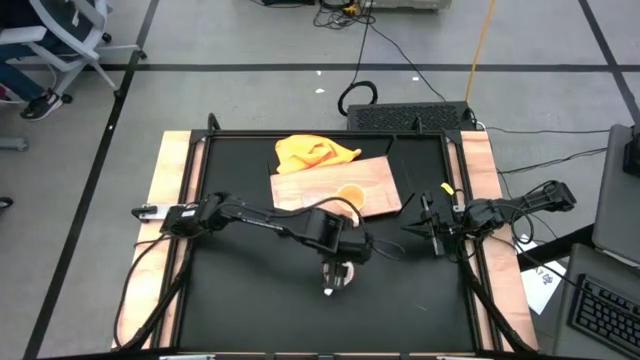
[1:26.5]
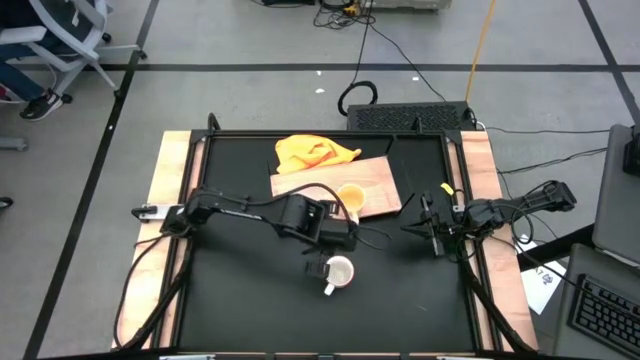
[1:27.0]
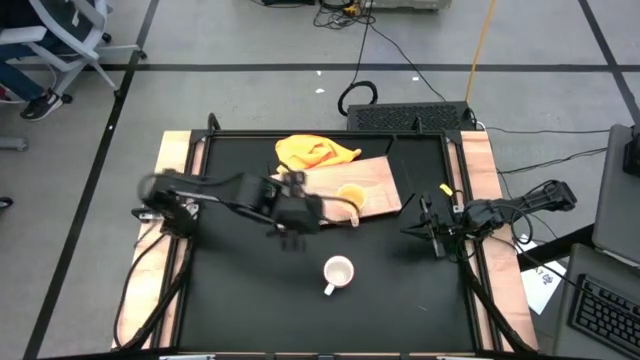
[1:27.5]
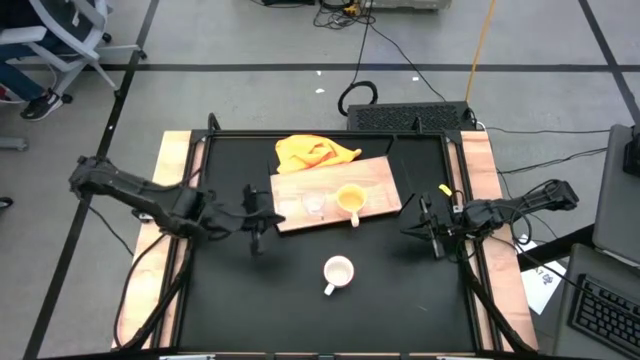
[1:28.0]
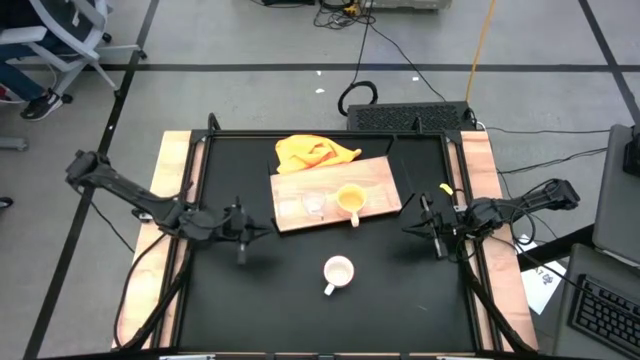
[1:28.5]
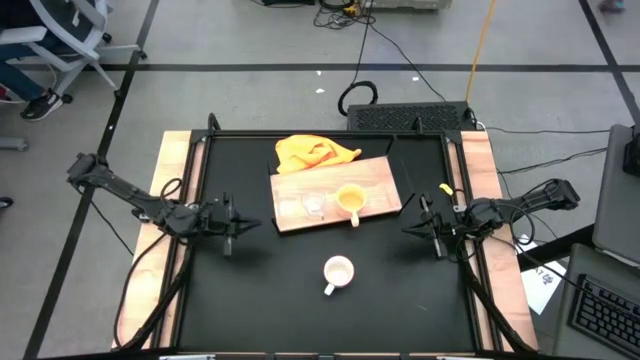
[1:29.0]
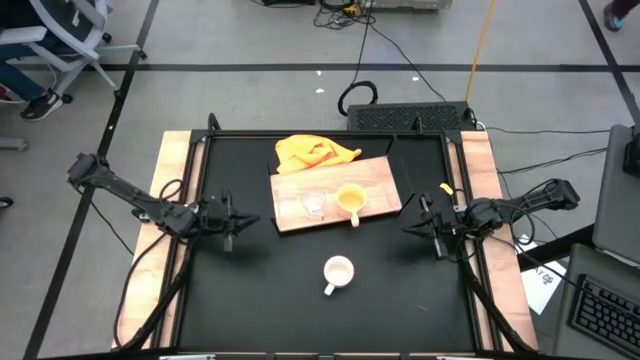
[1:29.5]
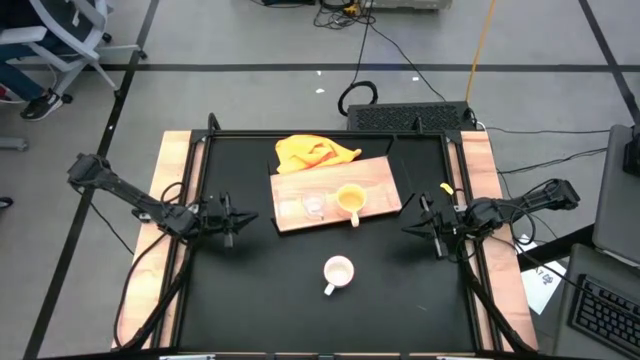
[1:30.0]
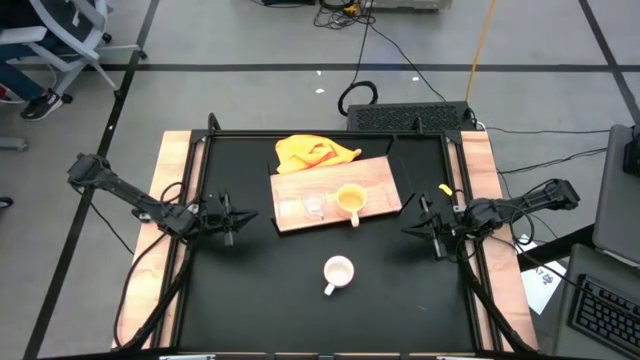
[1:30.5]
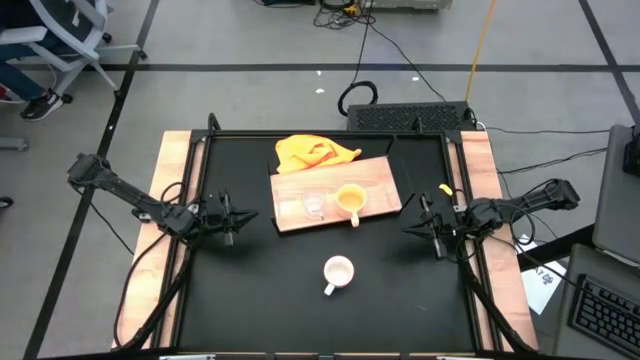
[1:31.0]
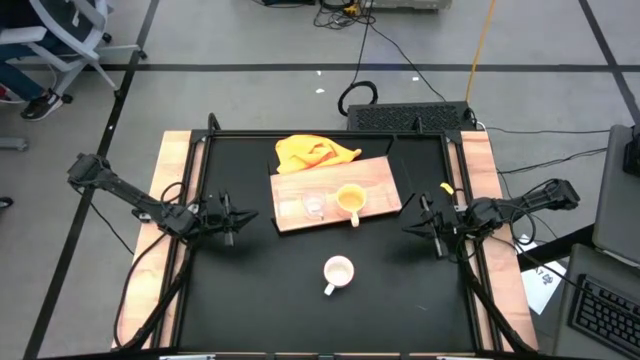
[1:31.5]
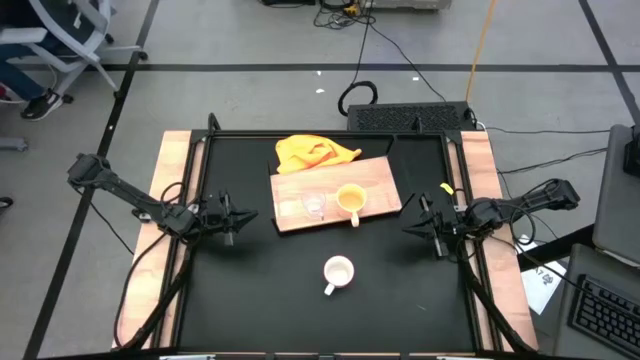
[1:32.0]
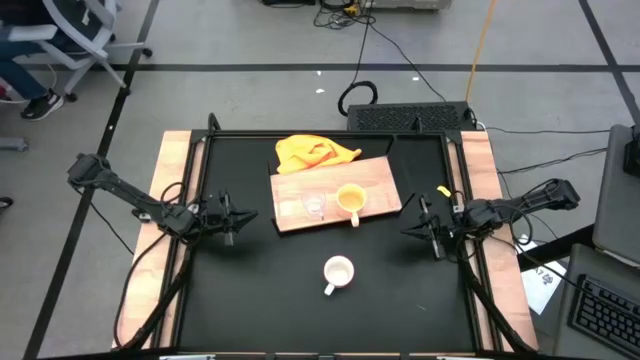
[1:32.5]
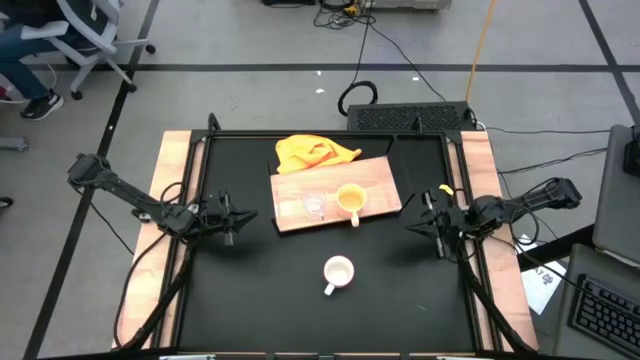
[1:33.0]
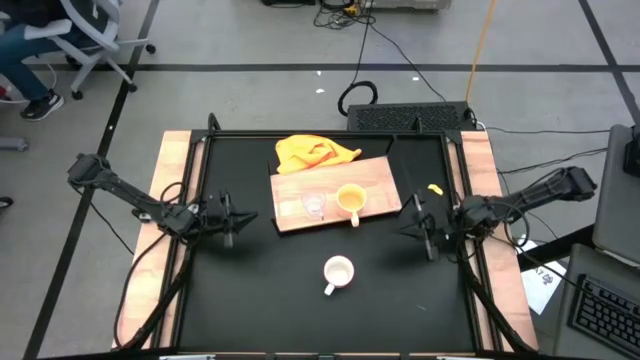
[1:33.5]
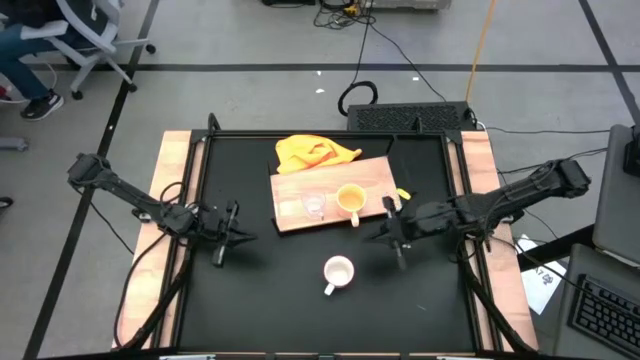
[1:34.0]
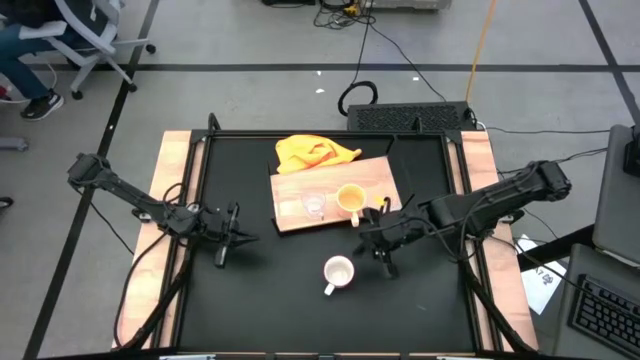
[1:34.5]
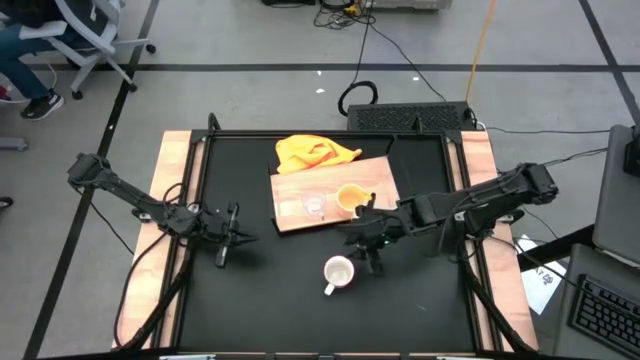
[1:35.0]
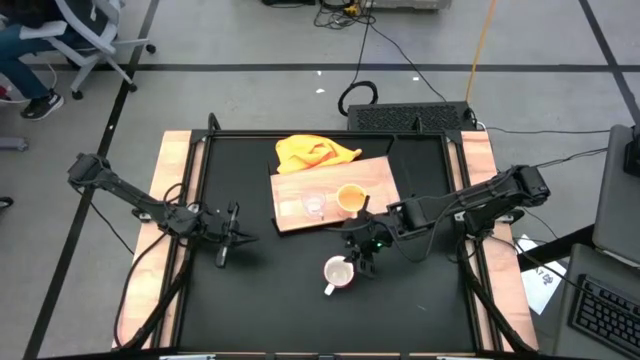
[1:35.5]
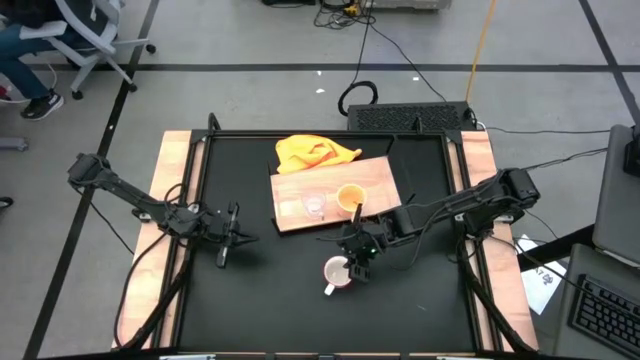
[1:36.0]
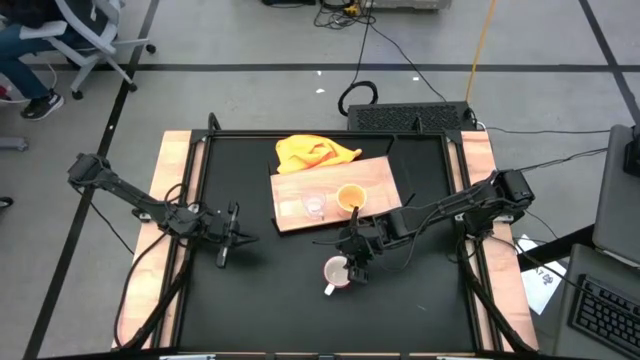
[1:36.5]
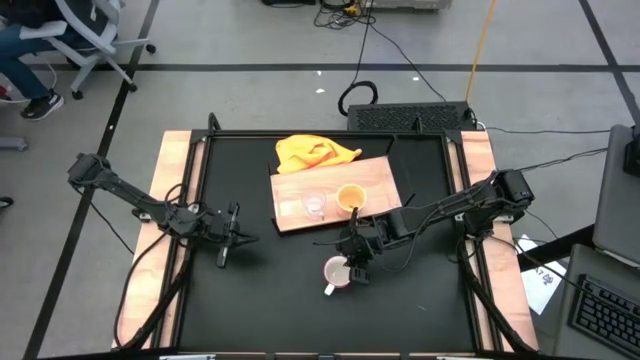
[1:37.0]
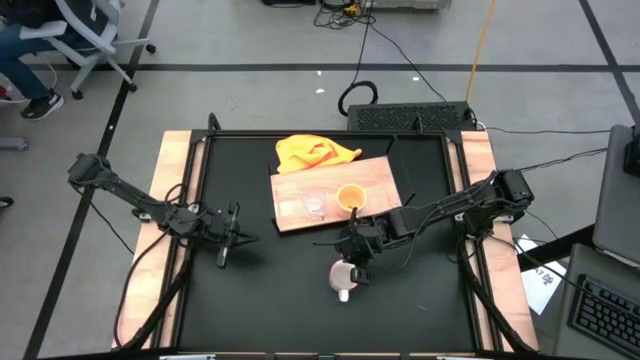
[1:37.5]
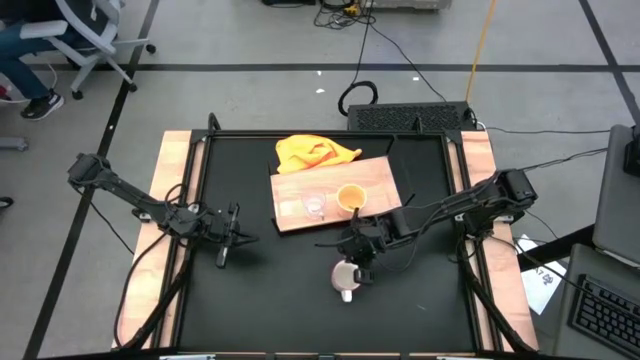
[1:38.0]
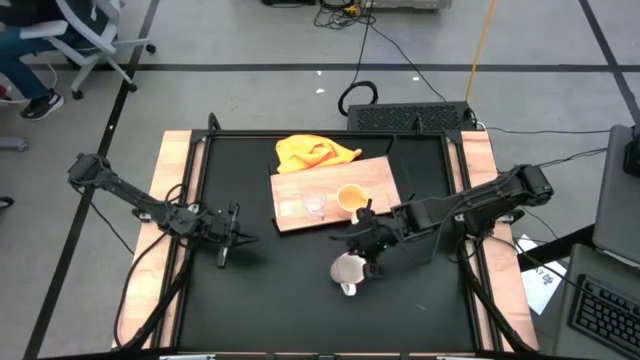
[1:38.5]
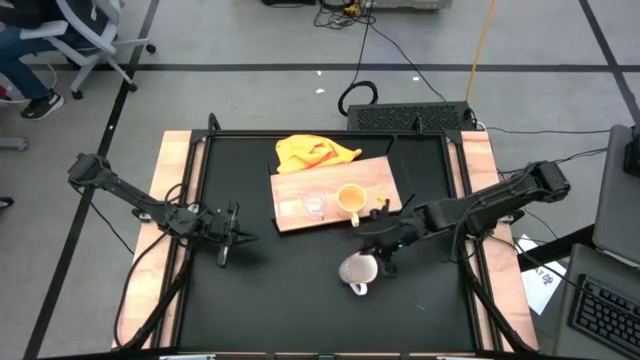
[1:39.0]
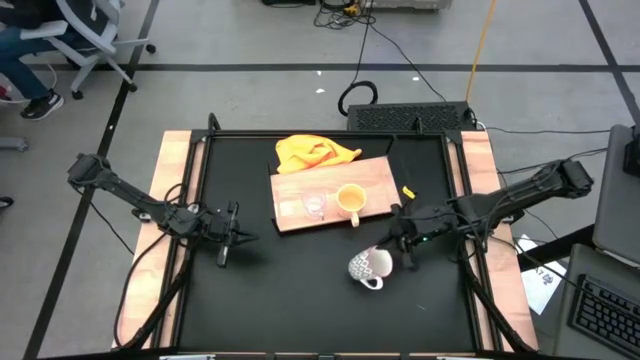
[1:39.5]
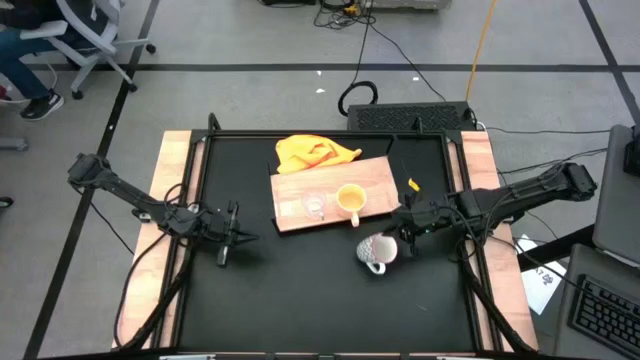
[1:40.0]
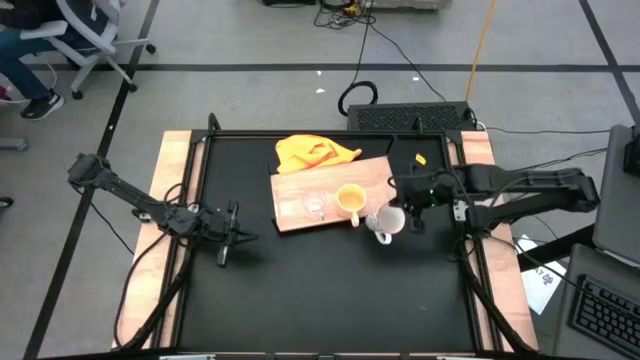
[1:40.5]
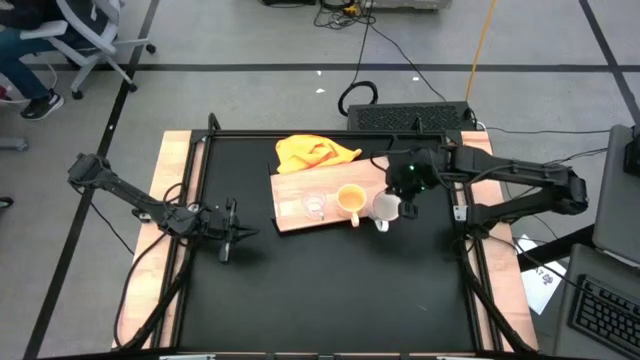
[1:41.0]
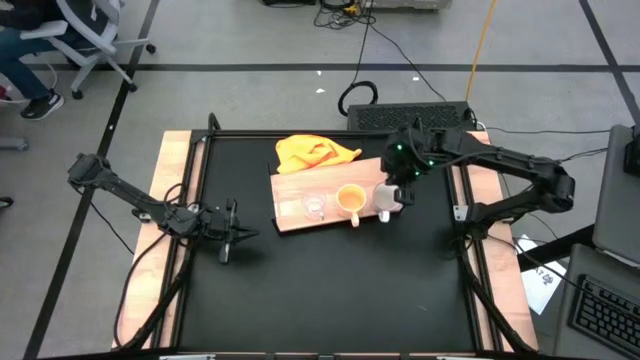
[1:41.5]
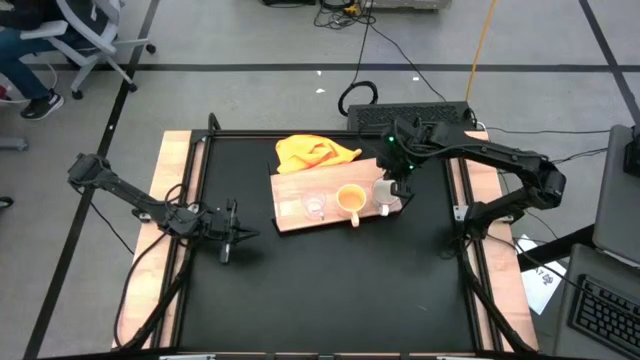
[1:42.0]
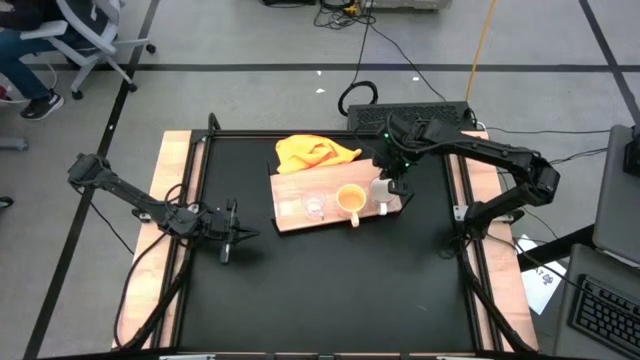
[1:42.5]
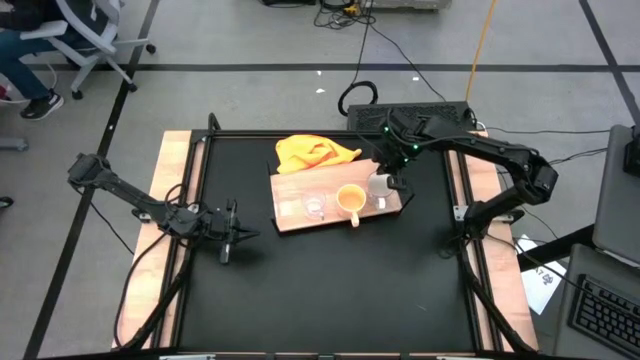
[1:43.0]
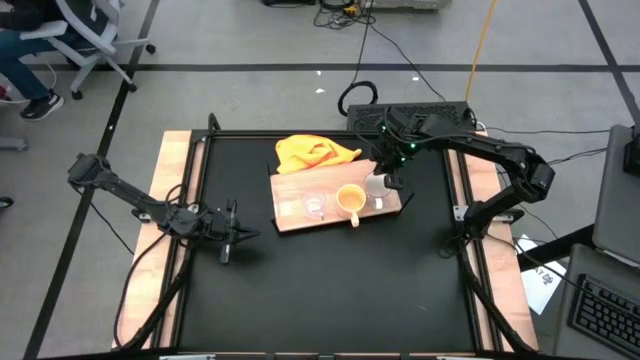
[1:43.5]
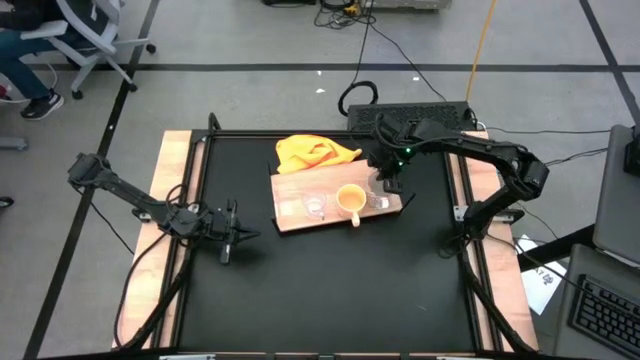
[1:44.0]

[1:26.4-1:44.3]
Task: Stack small to large cups/mugs on shelf
Put the gray patterned mug on the shelf

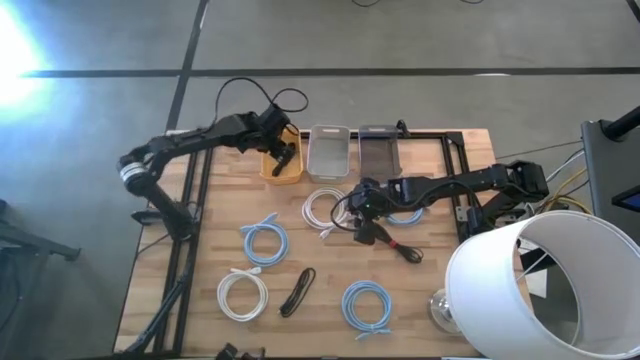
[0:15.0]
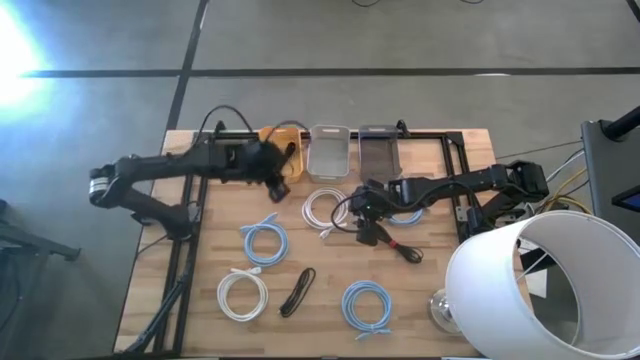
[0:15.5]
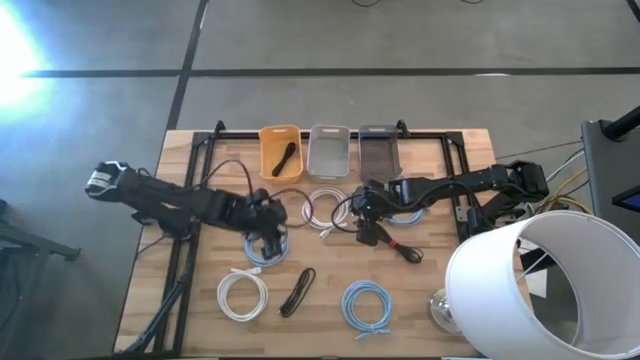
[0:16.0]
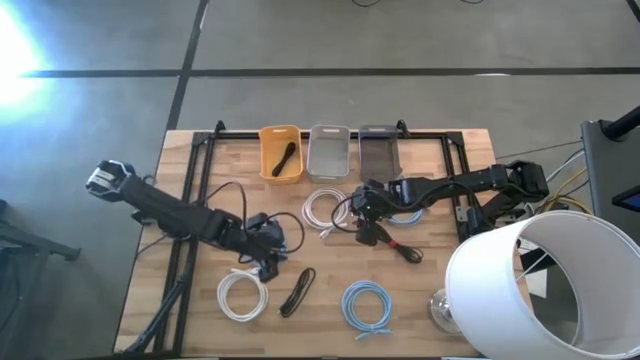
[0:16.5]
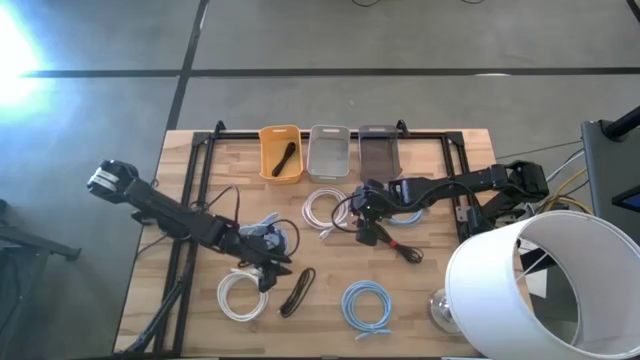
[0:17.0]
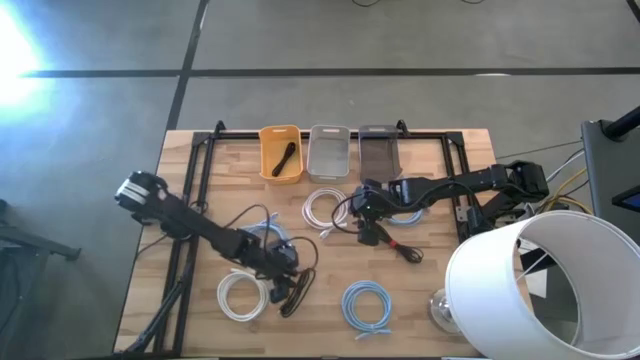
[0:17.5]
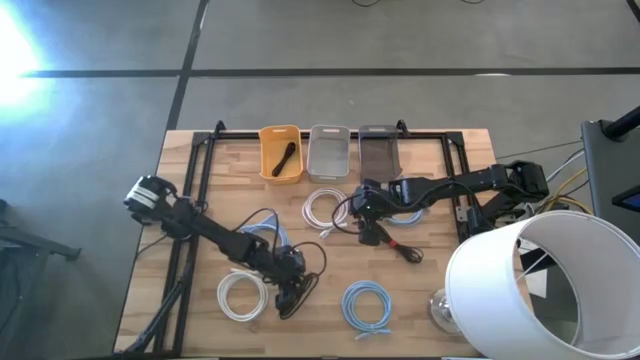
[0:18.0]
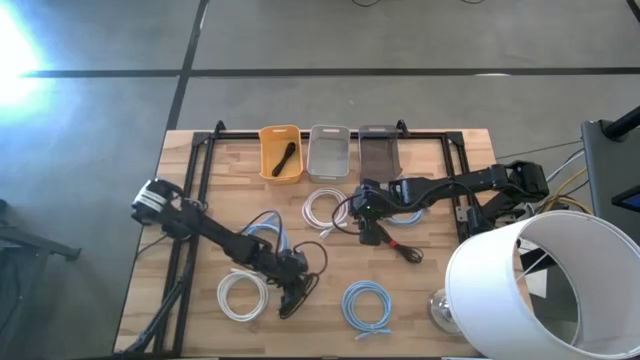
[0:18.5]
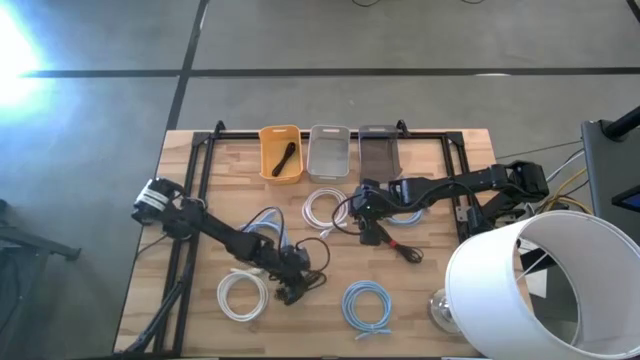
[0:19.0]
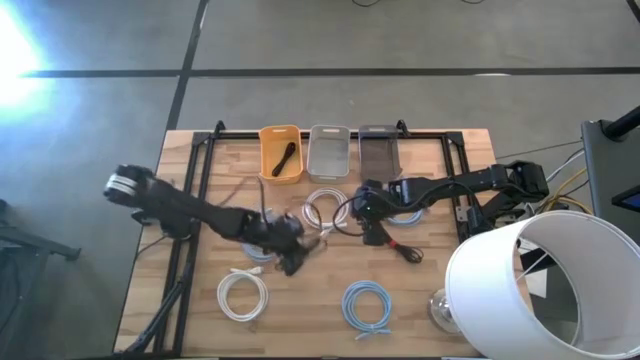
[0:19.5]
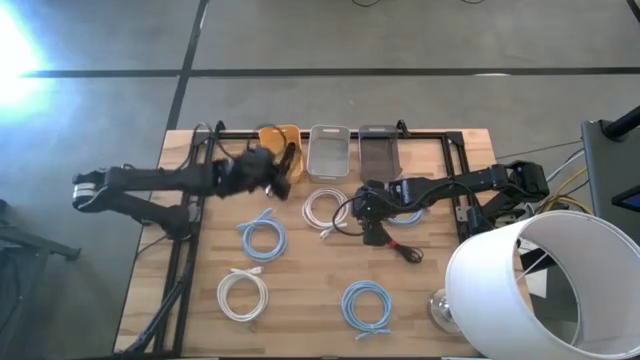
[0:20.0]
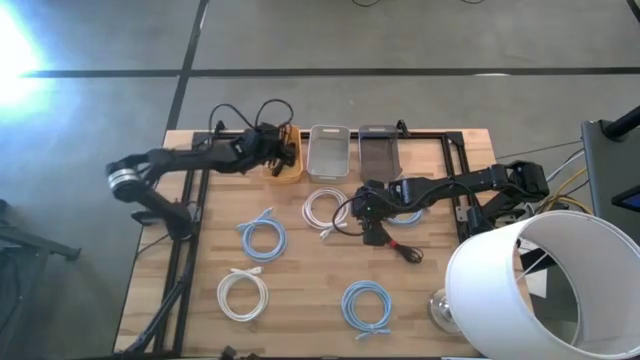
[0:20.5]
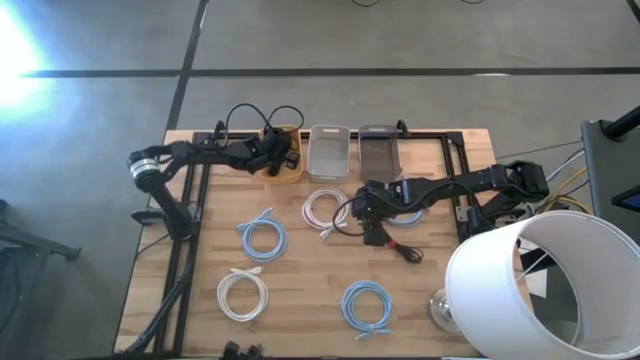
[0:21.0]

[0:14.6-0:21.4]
Task: Pick & Place USB Port
Put the left black charger cable into the yellow bin
